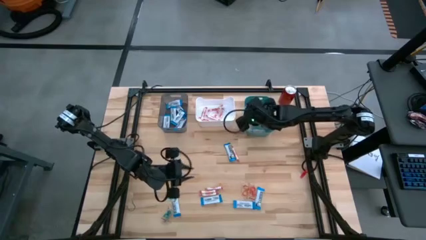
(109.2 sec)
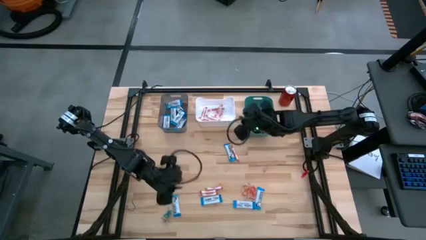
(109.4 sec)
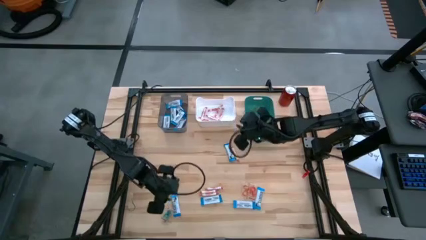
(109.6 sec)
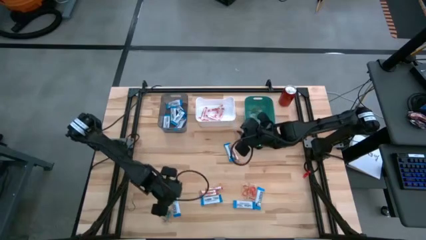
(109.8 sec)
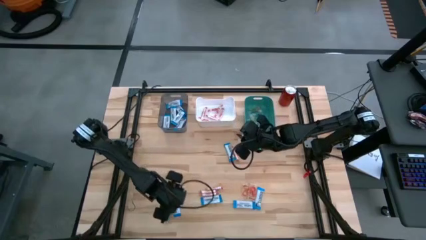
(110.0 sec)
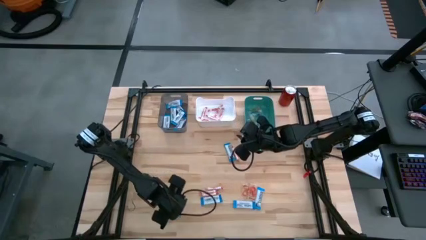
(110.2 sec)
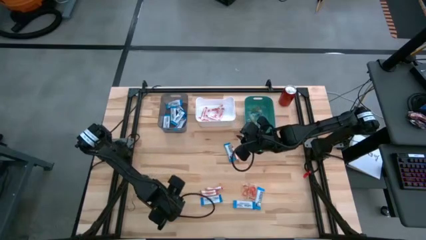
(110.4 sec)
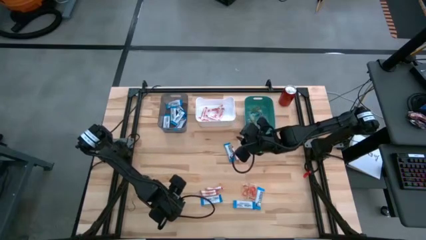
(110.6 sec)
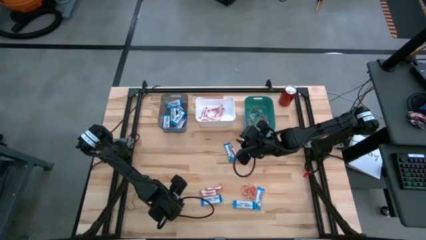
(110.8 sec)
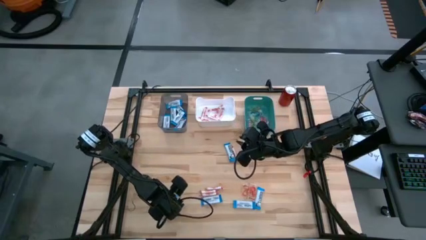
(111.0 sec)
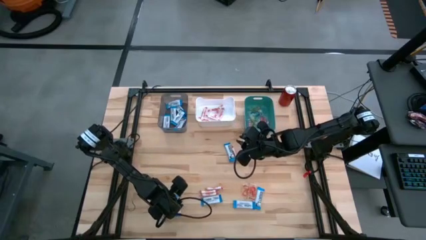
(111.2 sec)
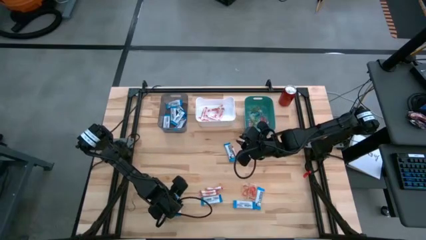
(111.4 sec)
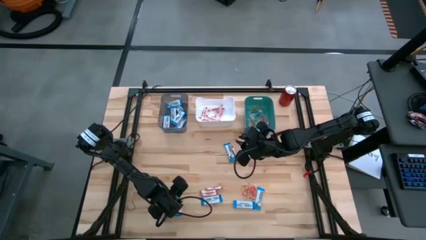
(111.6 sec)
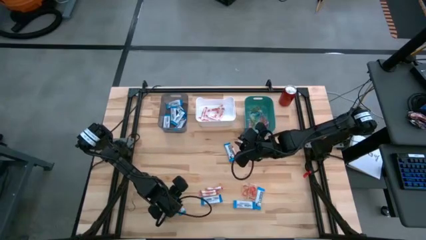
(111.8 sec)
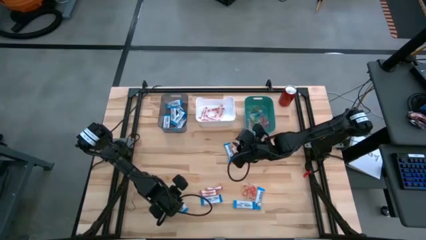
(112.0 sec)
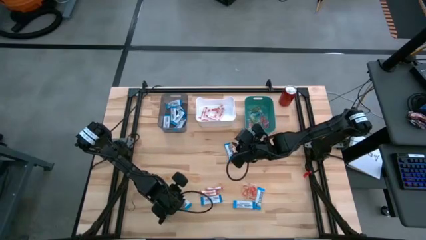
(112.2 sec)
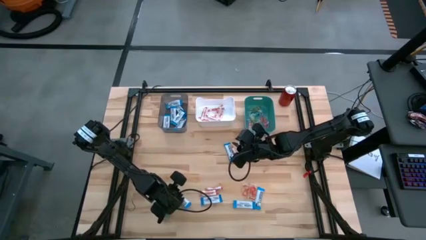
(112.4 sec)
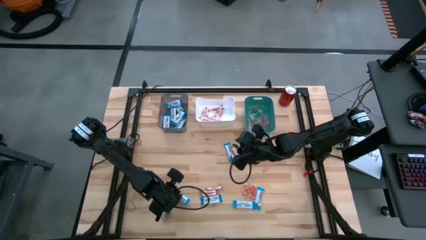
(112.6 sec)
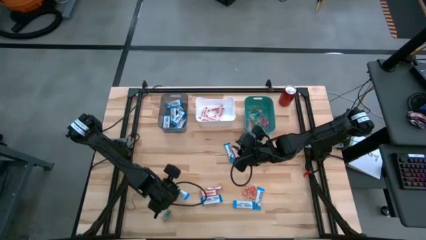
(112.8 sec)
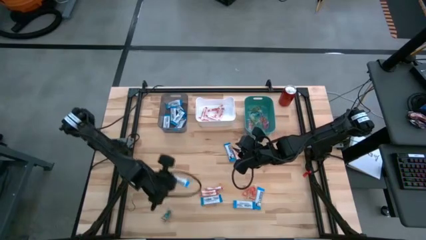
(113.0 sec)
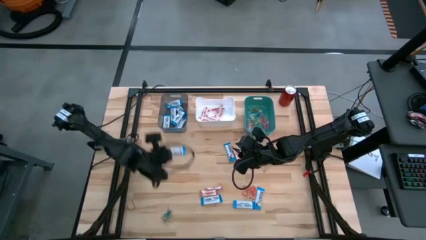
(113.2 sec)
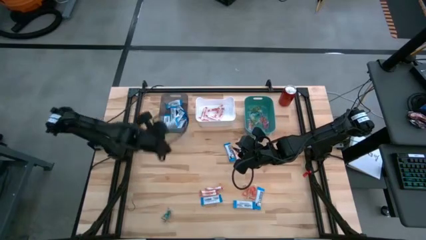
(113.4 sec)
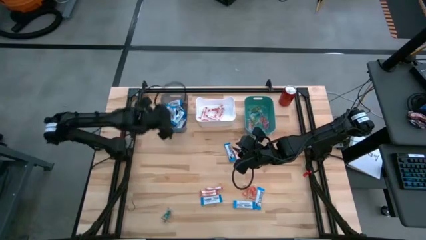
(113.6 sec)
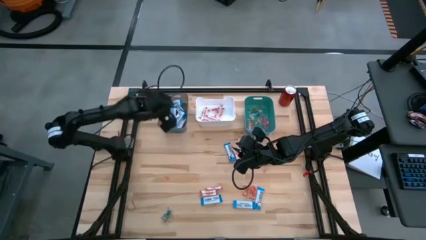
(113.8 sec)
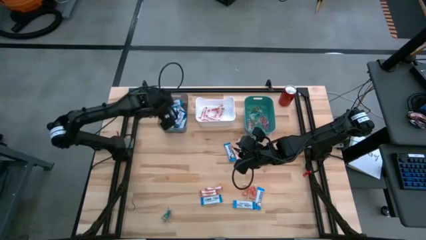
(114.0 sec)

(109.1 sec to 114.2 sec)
Task: Sort candy
Put the white chocolate into the gray bin

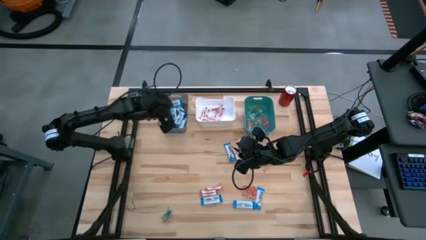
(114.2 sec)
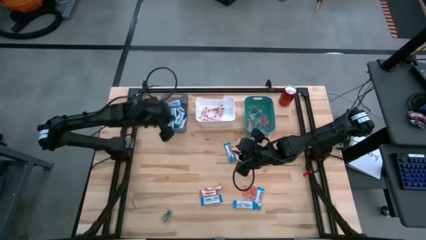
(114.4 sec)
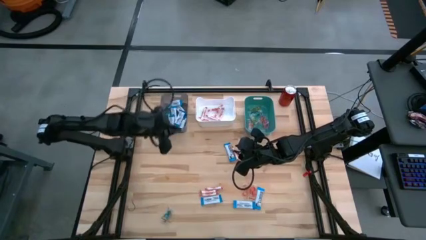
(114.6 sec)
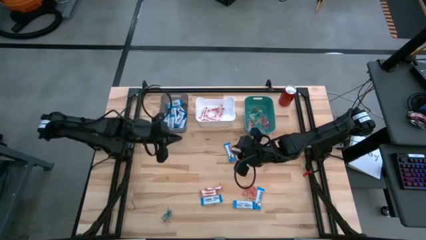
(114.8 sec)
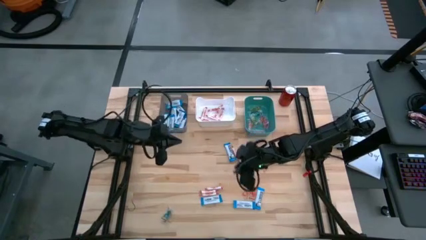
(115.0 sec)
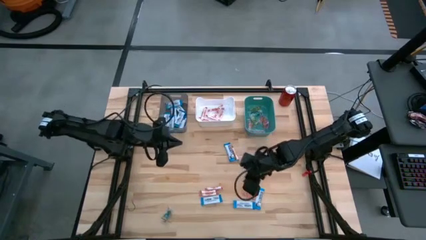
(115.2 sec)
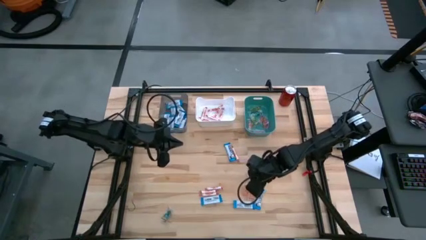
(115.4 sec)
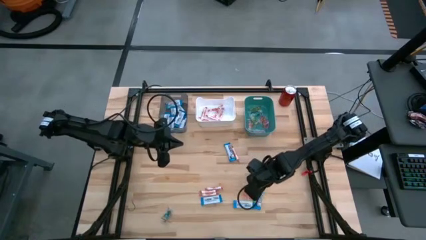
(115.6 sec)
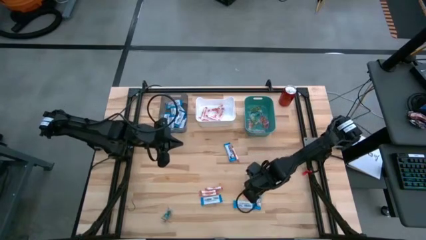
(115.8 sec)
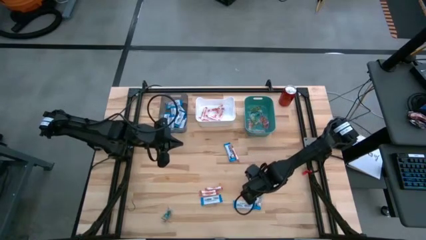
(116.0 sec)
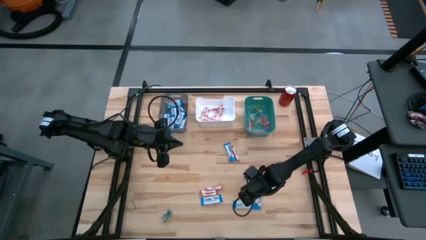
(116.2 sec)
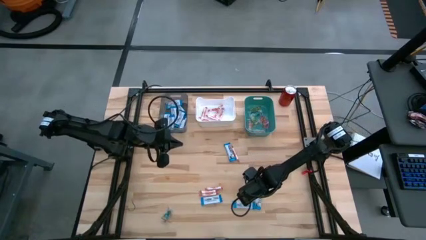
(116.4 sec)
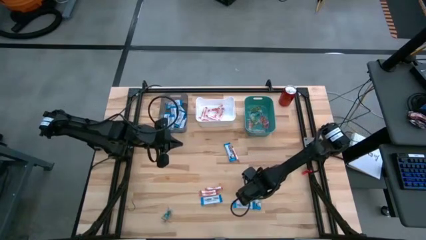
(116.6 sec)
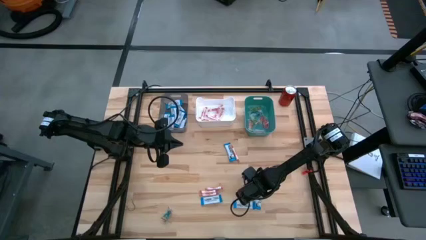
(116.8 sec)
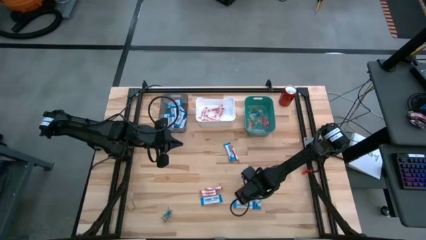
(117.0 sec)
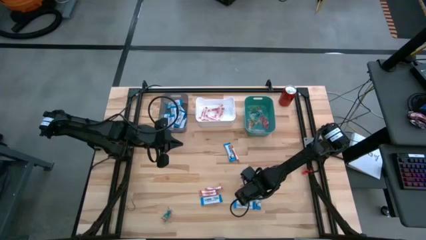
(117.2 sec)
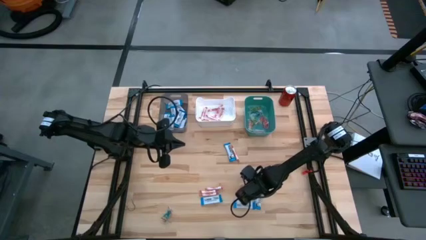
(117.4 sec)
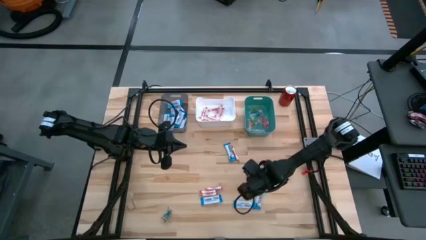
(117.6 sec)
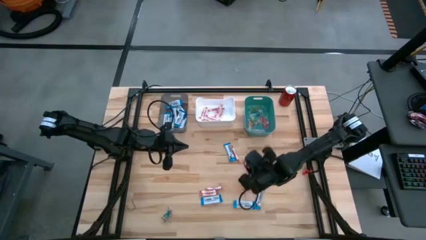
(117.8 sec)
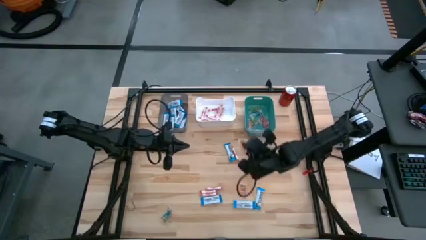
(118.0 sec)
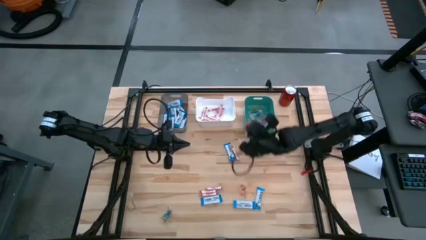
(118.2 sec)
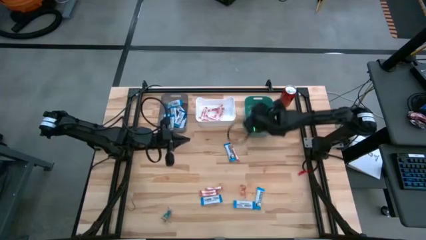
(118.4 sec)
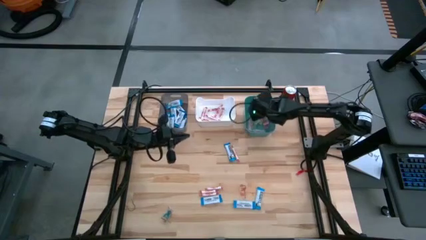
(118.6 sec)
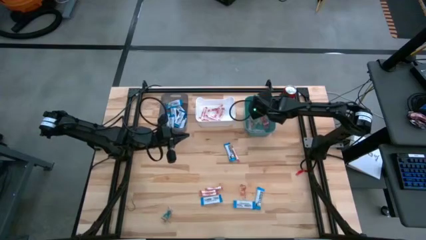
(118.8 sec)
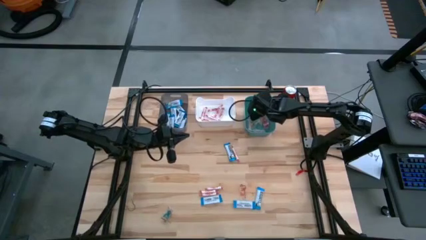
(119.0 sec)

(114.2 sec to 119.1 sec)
Put the transparent candy into the green bin

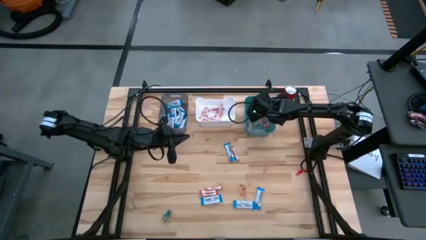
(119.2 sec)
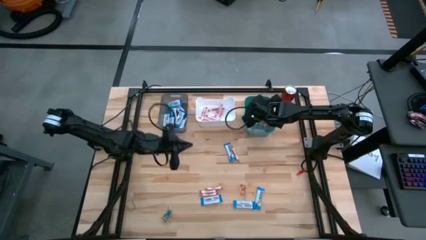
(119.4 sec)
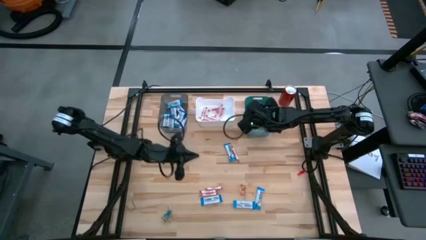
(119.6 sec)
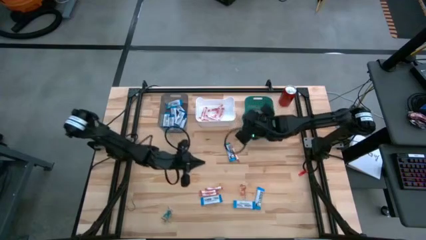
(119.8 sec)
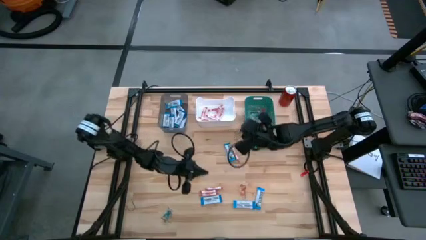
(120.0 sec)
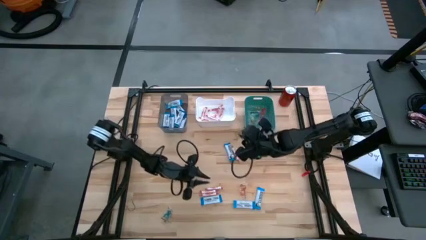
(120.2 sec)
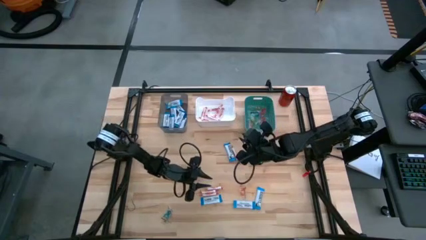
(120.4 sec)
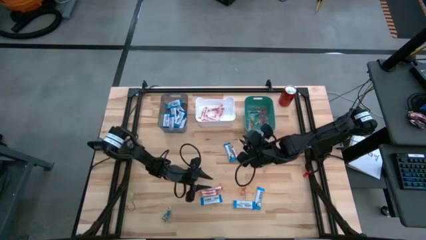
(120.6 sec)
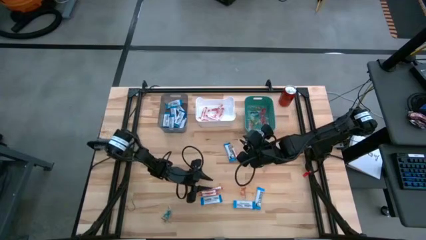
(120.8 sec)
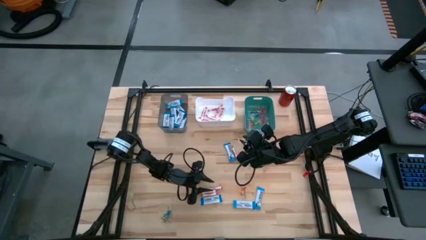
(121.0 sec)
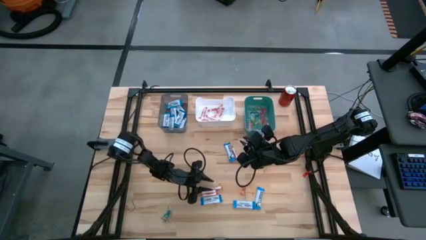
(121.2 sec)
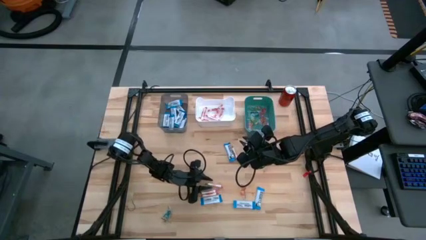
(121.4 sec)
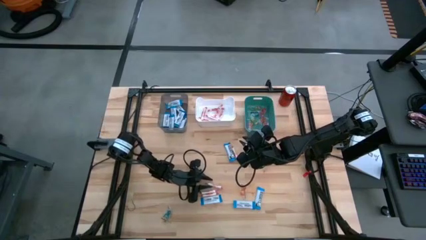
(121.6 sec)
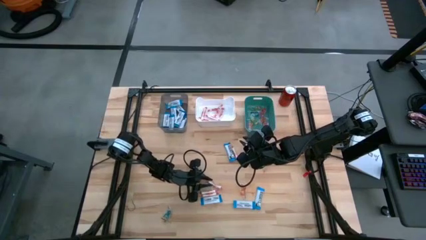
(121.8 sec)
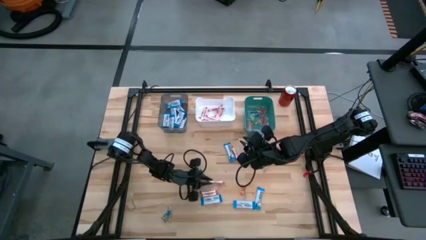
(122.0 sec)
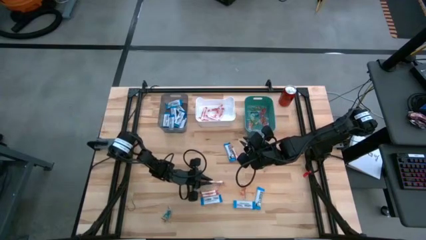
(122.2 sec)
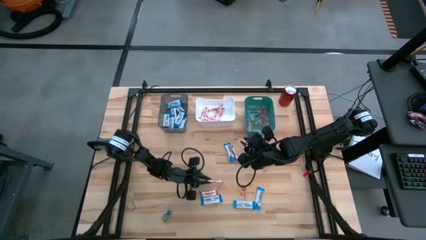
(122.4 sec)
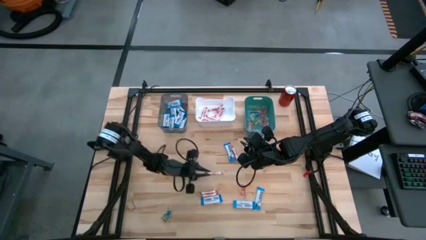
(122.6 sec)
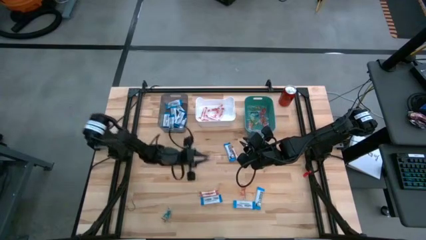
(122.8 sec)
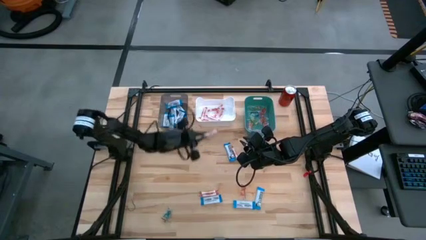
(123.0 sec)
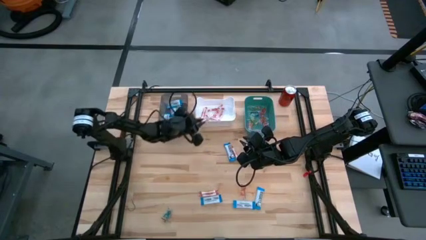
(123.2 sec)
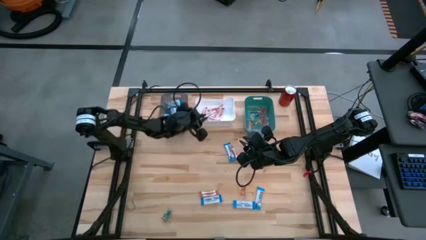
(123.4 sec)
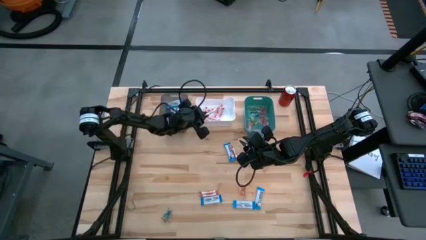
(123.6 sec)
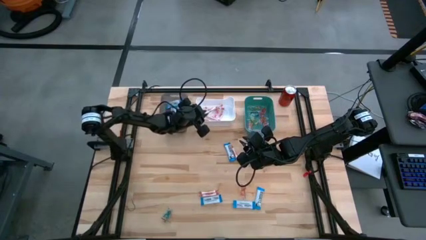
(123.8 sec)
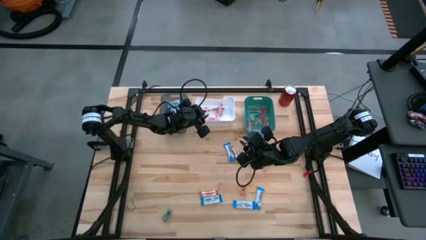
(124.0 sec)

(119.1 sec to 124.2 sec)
Put the orange candy into the white bin

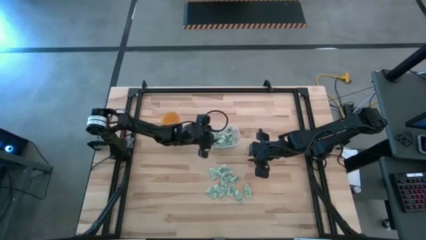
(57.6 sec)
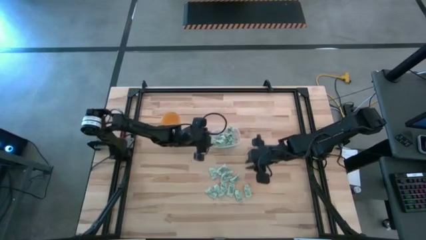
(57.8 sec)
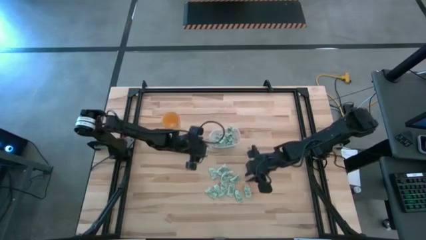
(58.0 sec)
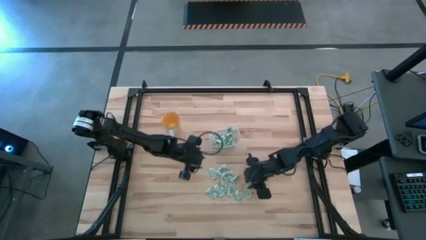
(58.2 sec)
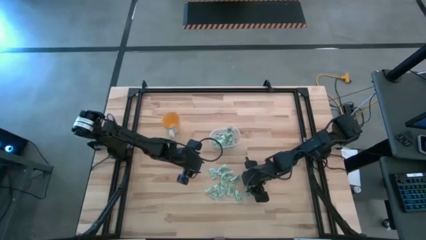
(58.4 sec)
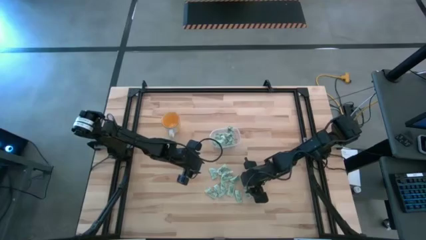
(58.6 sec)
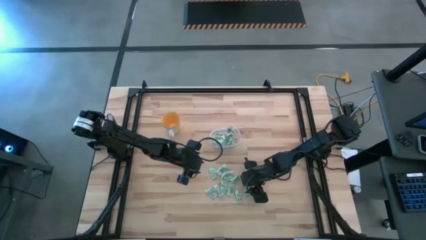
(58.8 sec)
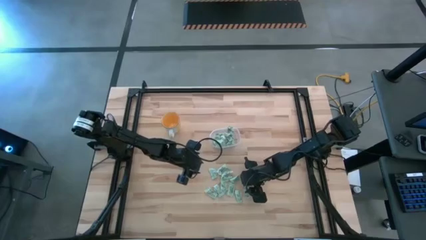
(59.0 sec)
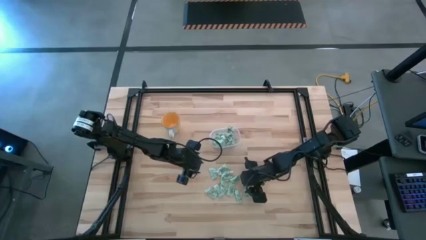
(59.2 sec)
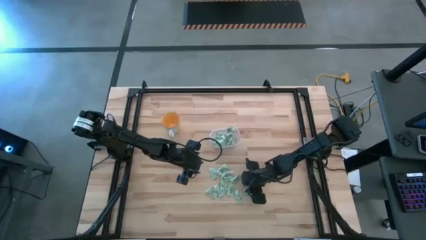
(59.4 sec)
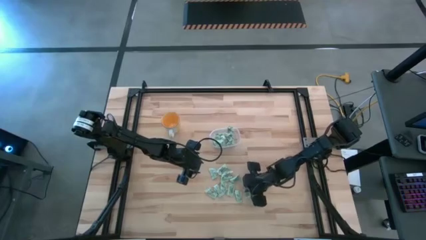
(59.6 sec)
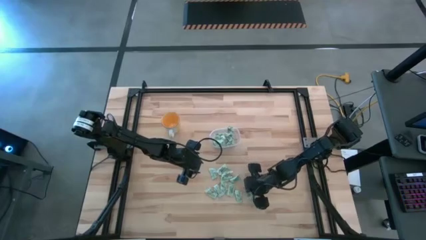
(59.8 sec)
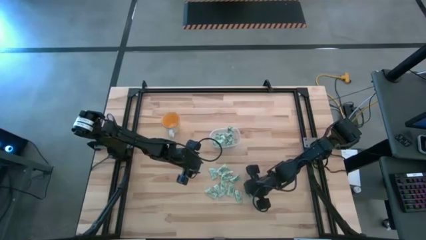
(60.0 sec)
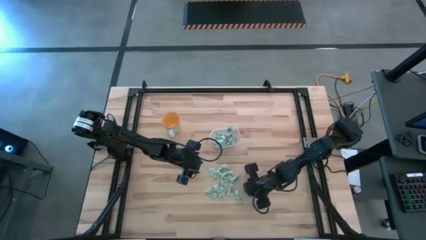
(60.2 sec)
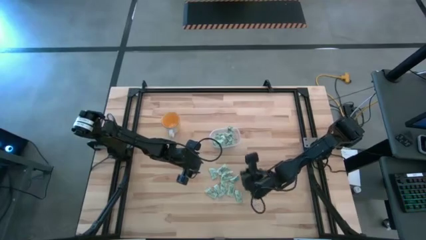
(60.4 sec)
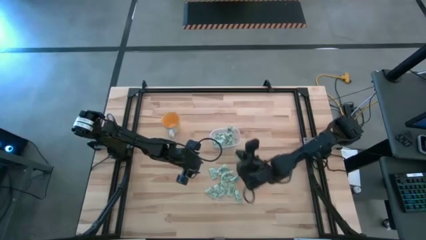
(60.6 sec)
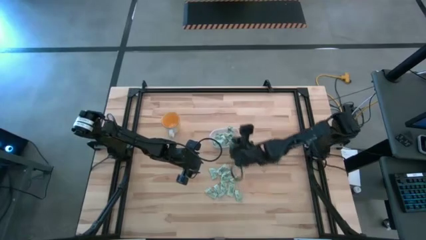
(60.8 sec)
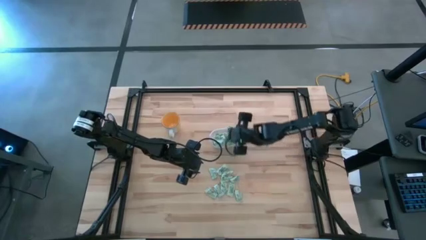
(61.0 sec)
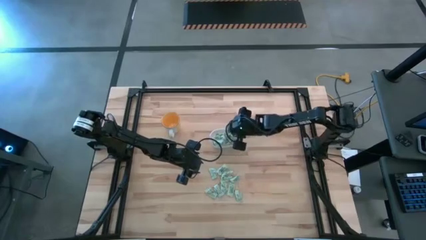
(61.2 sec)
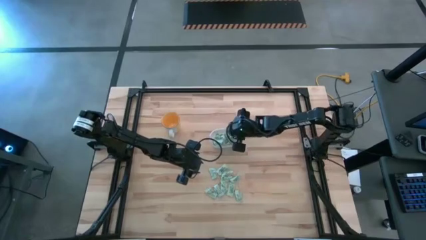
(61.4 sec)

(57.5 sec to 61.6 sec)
Task: Pick and place Stevia / Truvia into bins
Put the stevia packet into the transparent bin
